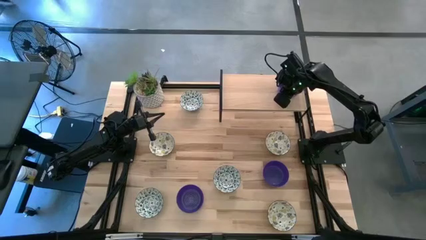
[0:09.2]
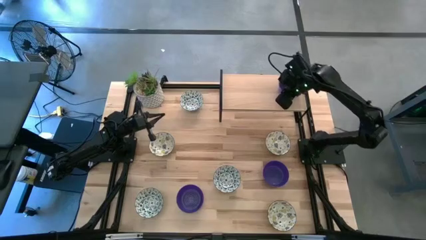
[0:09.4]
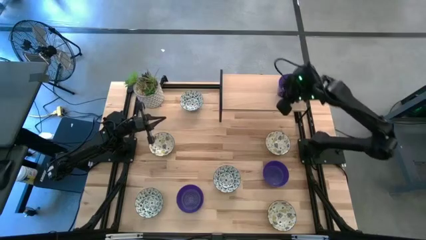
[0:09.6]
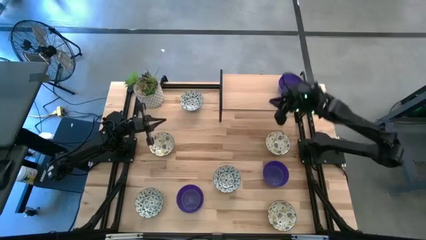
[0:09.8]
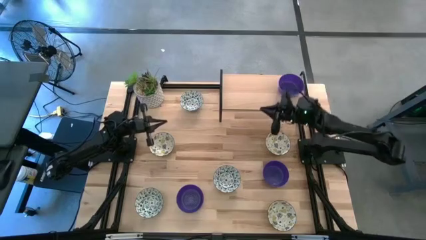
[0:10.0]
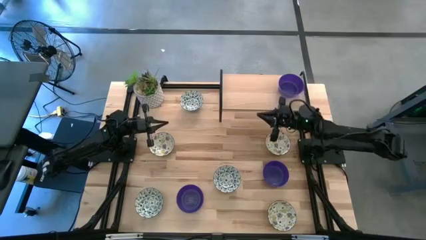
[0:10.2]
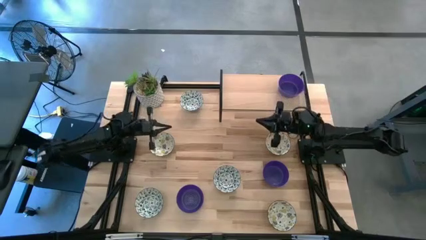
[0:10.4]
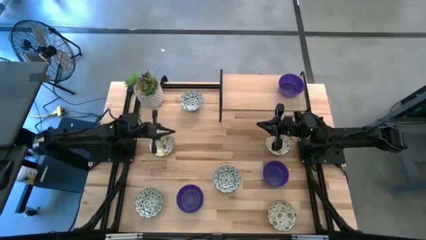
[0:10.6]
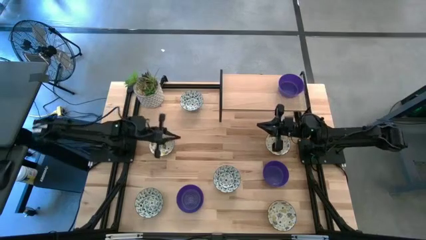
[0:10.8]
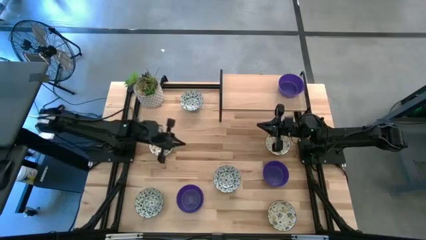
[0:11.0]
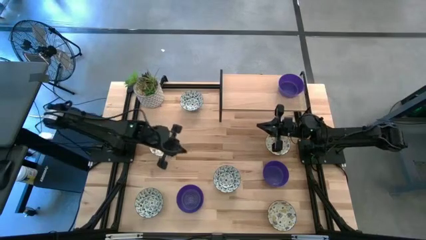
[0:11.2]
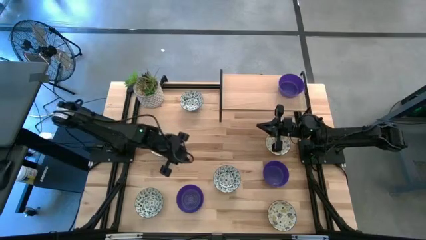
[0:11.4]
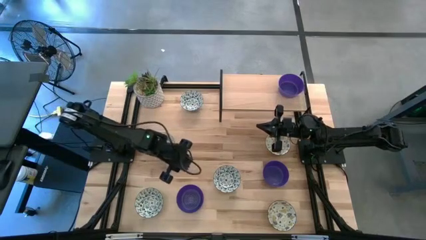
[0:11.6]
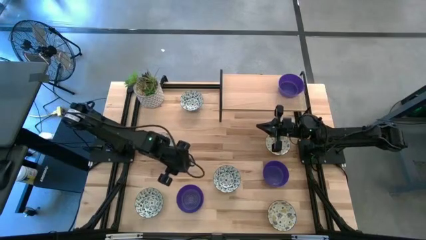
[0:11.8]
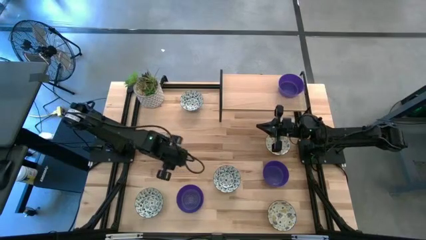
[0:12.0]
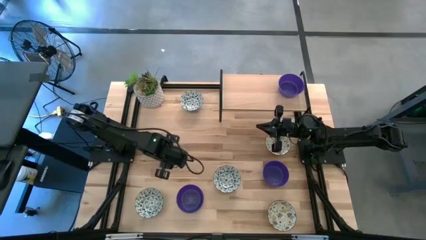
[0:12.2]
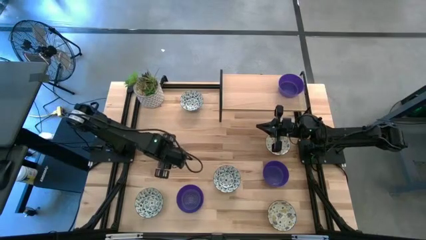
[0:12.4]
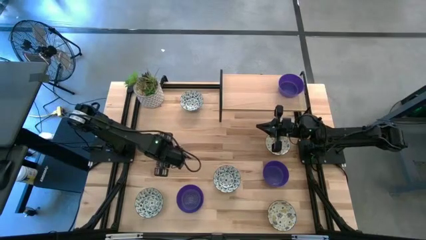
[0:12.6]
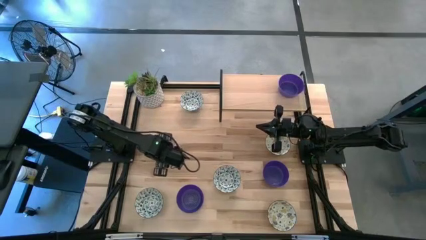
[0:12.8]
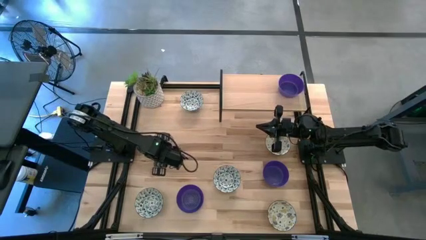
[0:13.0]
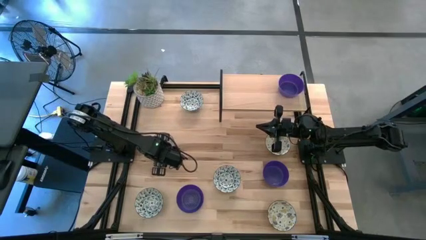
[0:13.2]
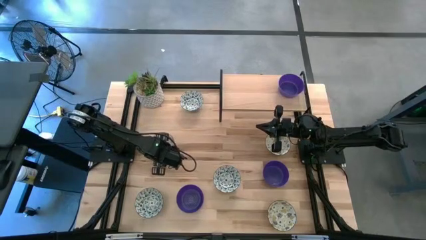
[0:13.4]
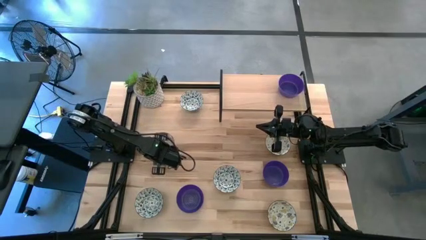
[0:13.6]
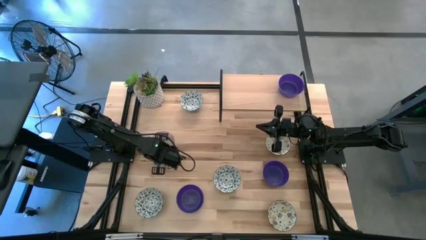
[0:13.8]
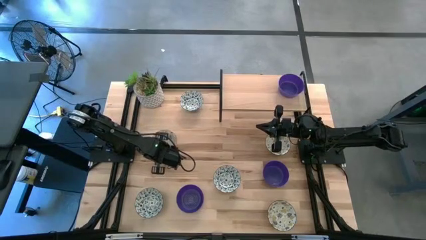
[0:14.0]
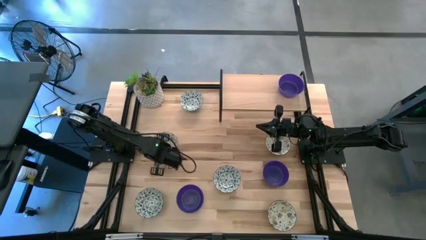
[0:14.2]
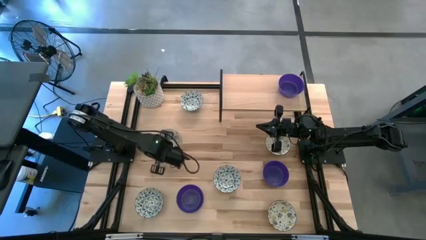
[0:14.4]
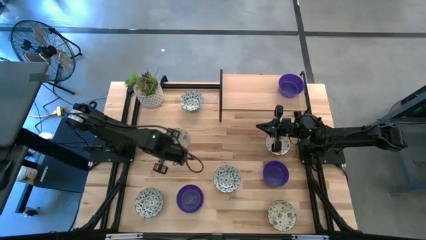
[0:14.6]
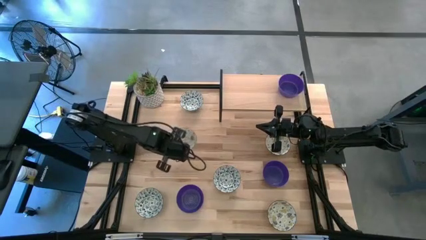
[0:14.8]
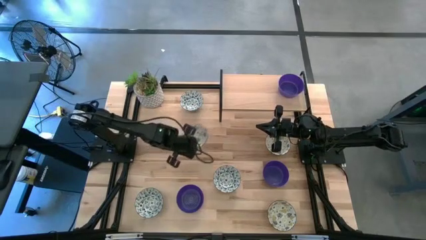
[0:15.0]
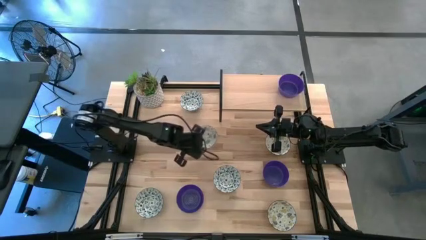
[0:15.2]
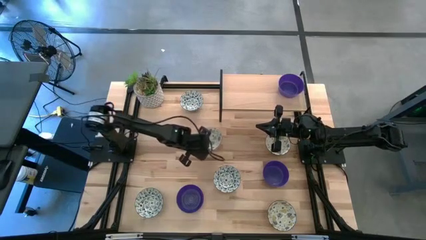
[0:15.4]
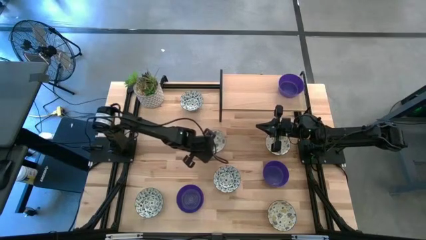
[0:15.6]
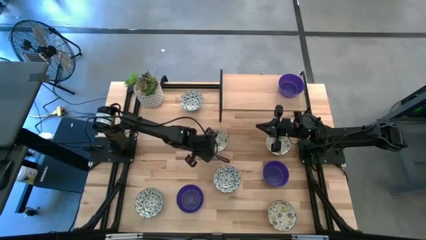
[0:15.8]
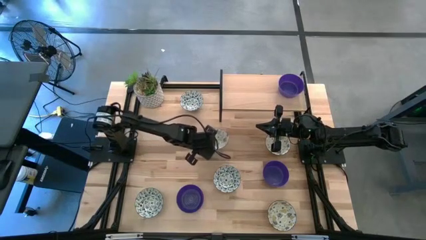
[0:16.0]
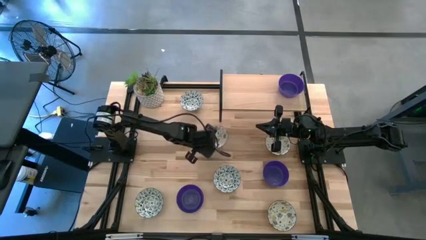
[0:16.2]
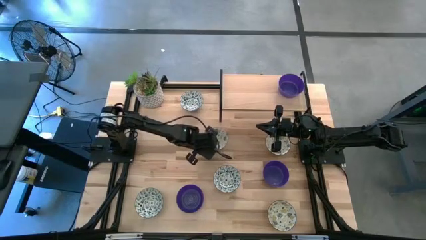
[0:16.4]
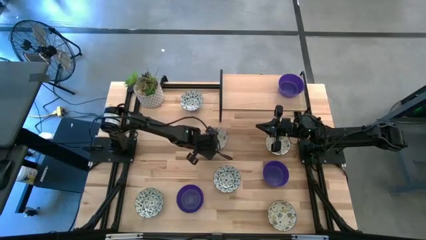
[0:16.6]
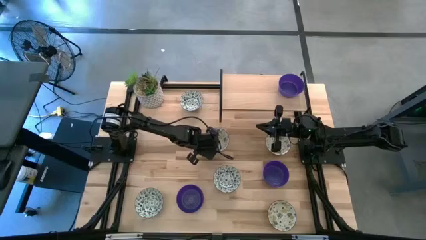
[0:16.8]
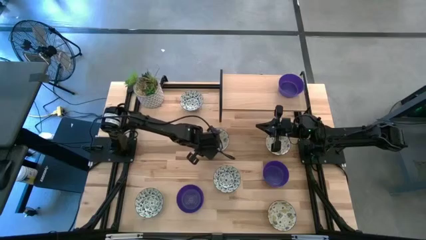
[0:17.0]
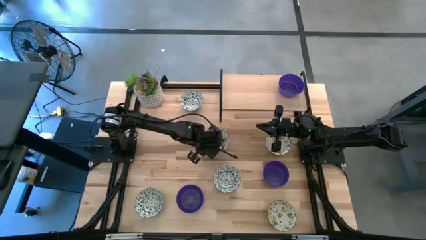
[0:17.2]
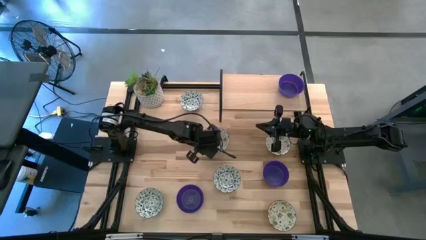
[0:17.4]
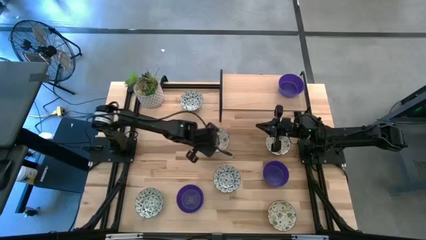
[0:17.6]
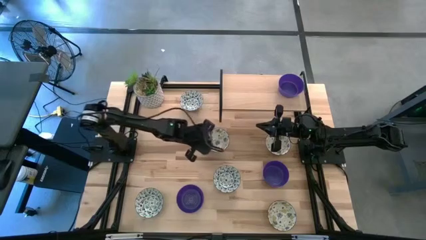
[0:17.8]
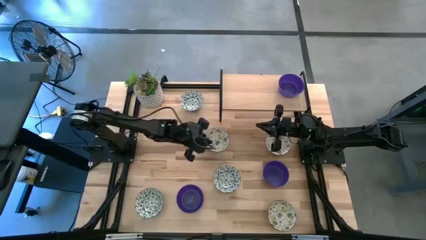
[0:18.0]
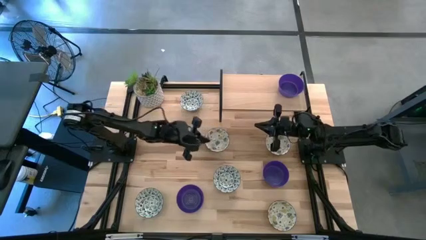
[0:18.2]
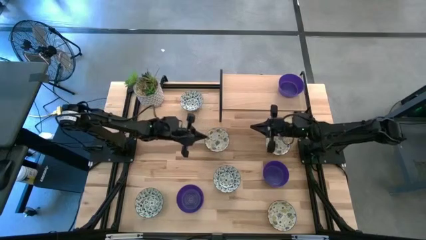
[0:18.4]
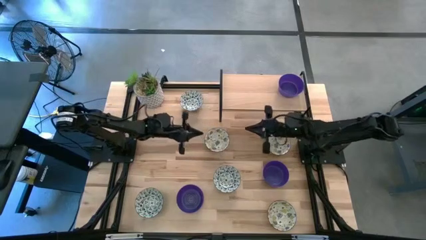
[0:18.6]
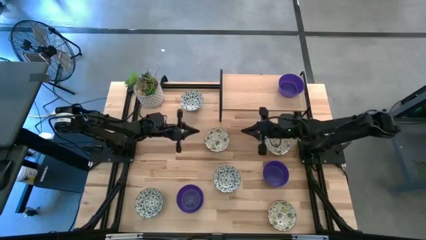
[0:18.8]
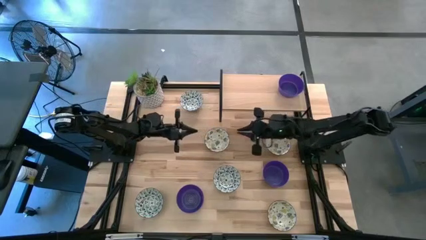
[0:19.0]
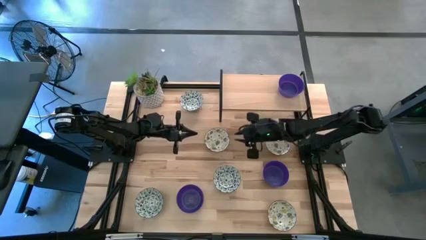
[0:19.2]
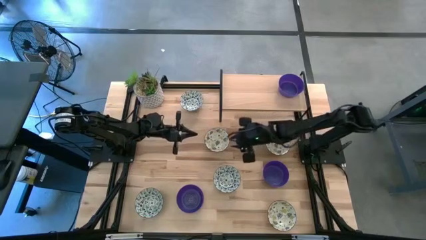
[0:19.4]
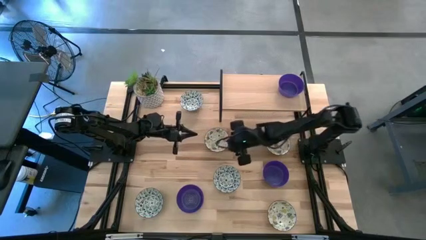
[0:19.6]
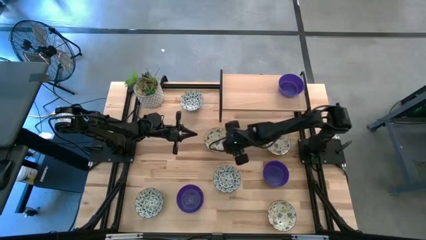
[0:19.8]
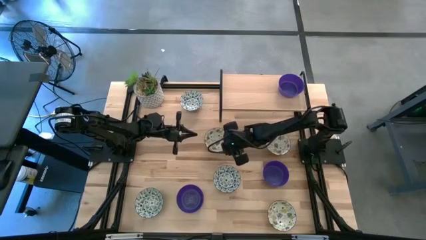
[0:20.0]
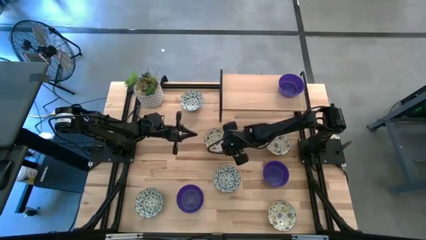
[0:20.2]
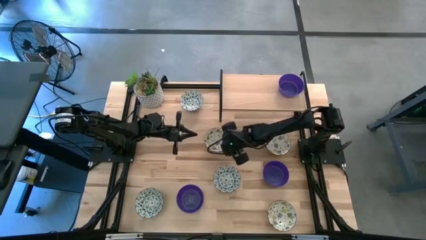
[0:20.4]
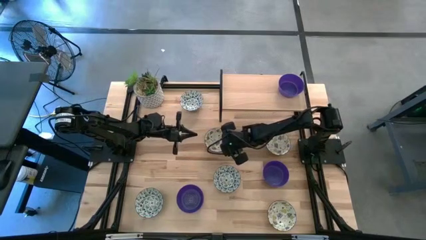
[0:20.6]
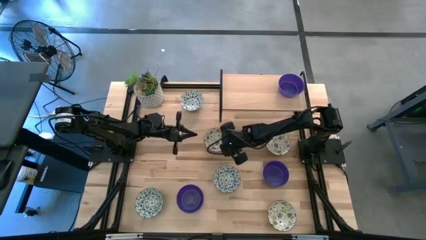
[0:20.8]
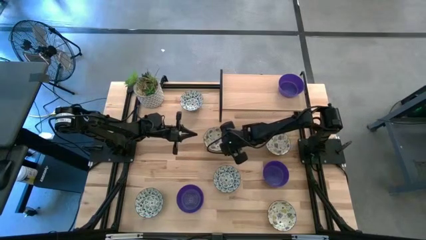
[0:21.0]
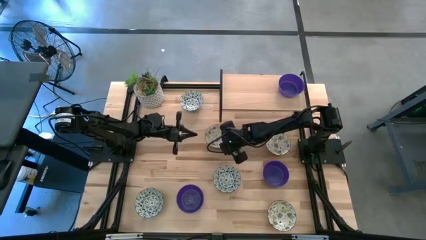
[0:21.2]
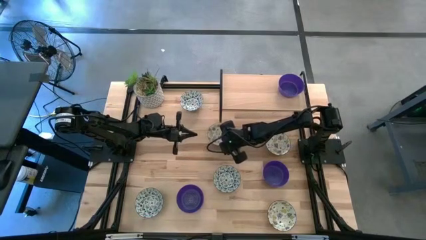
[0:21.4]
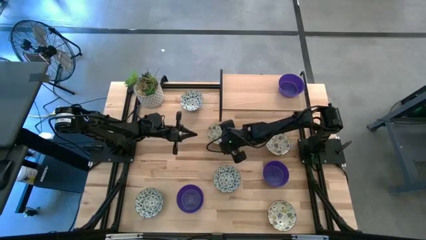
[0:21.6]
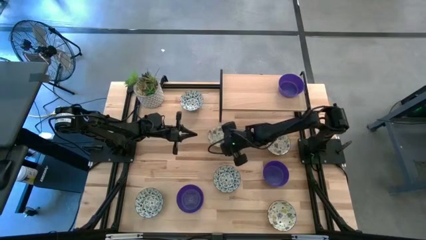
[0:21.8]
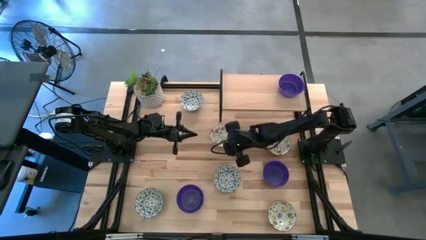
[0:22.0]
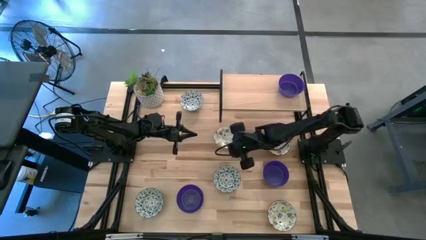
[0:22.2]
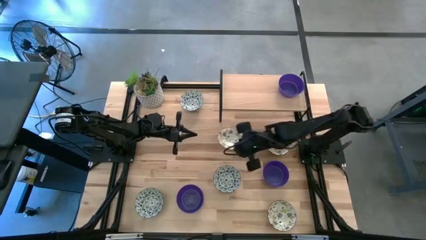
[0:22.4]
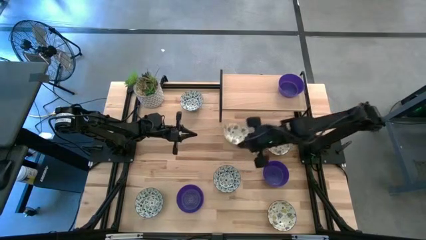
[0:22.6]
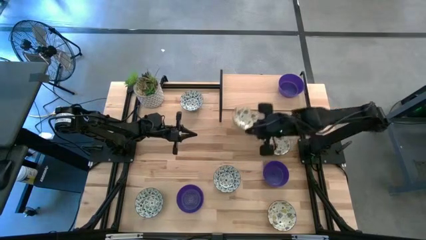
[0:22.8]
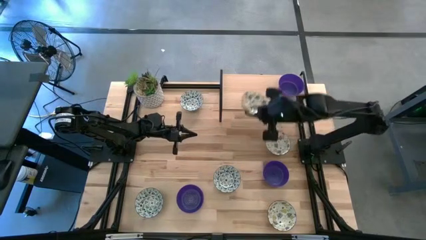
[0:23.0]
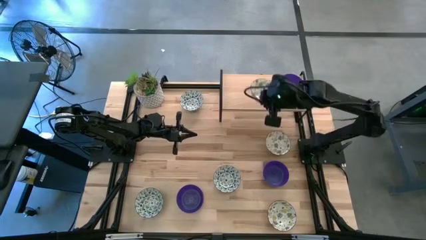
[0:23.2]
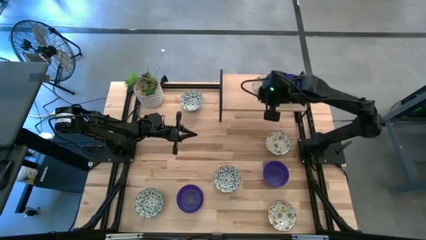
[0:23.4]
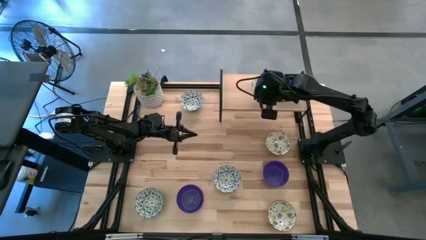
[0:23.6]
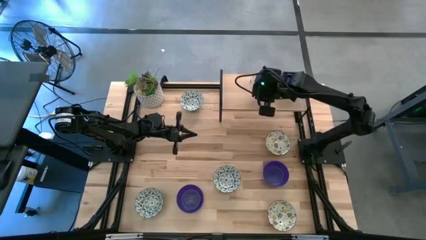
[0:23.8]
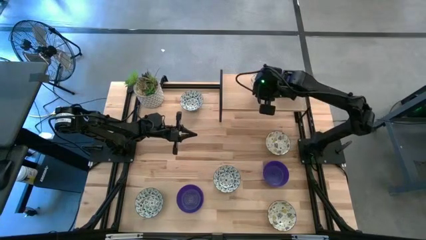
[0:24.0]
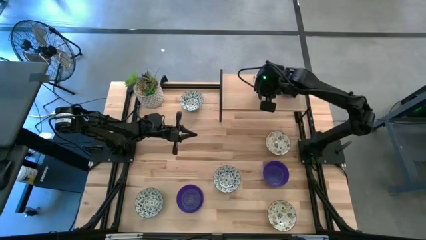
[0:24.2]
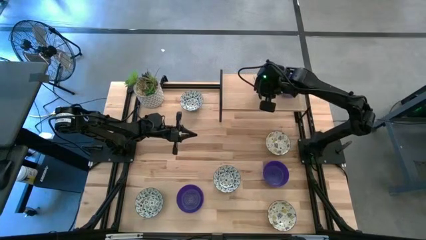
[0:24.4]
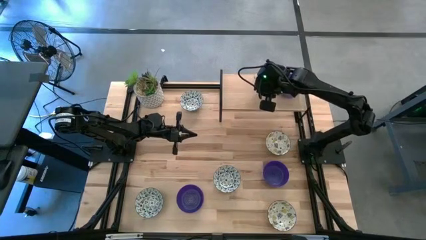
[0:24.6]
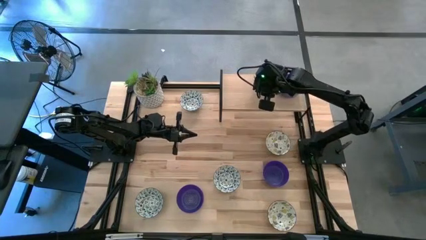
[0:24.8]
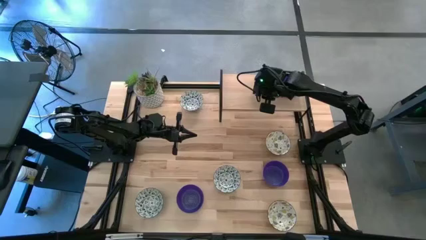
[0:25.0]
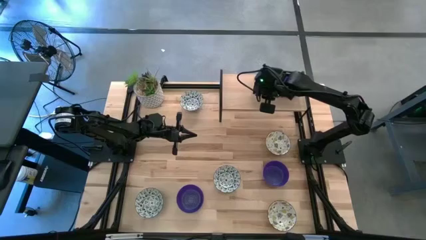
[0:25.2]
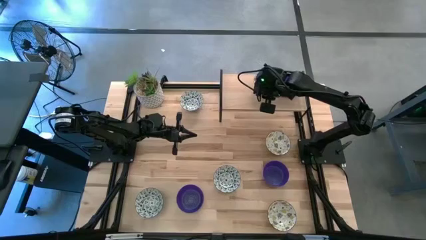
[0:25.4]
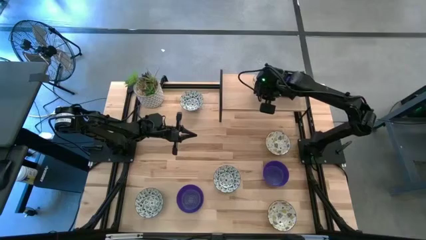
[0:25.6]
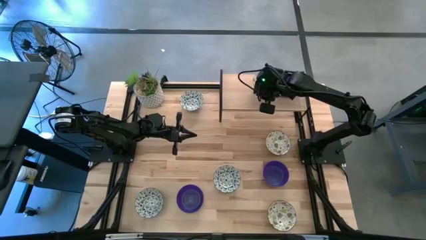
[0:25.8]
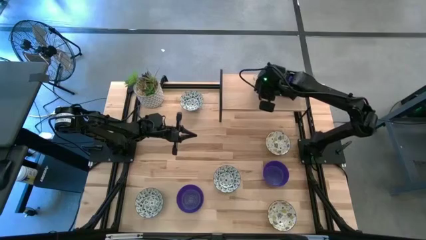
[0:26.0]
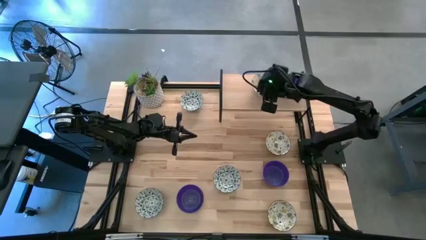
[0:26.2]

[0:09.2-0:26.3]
Task: Pick & Place Mini bowls
Put the top left white patterned bowl on the shelf
